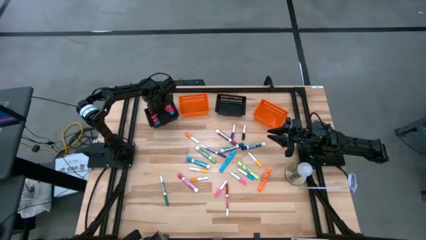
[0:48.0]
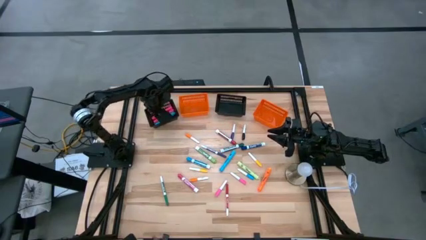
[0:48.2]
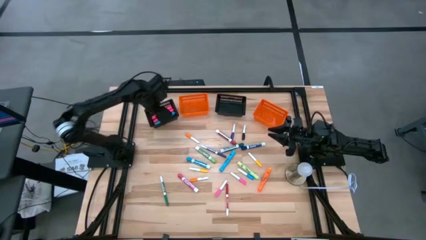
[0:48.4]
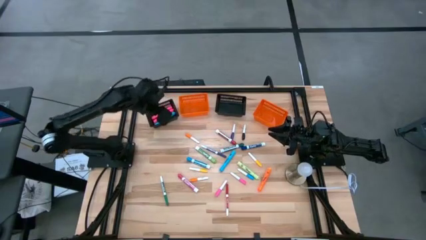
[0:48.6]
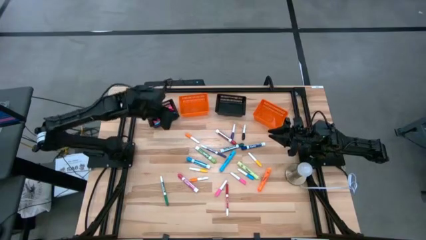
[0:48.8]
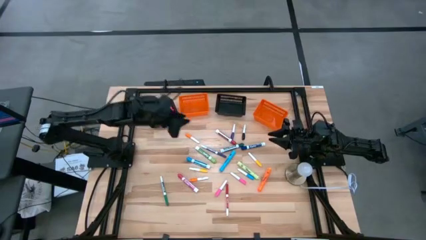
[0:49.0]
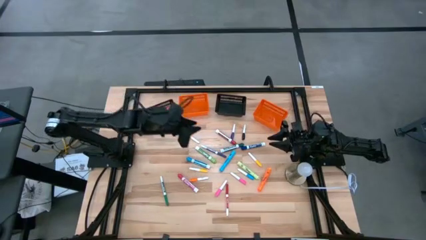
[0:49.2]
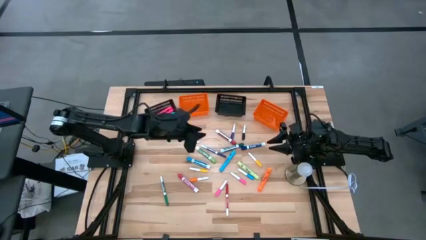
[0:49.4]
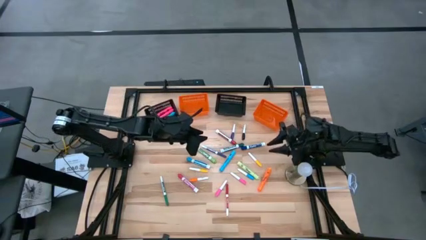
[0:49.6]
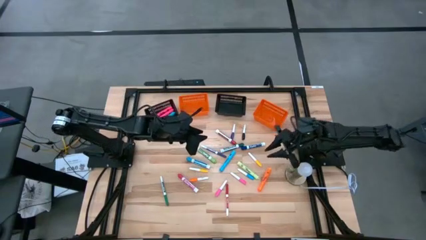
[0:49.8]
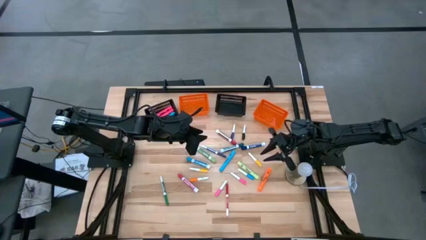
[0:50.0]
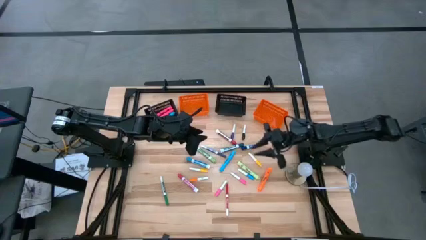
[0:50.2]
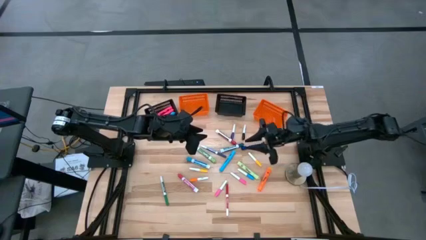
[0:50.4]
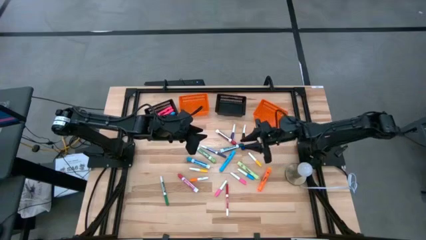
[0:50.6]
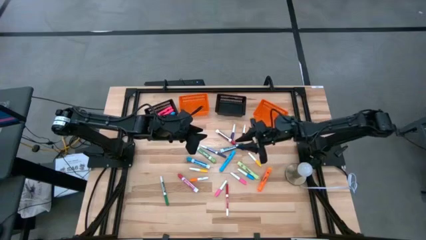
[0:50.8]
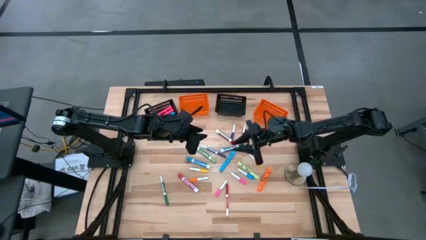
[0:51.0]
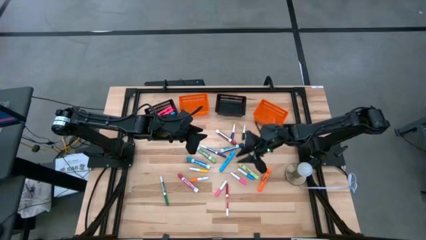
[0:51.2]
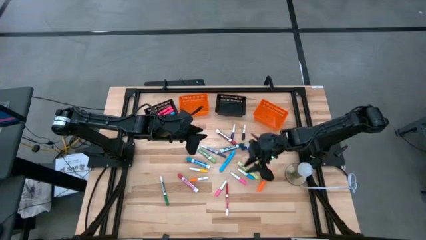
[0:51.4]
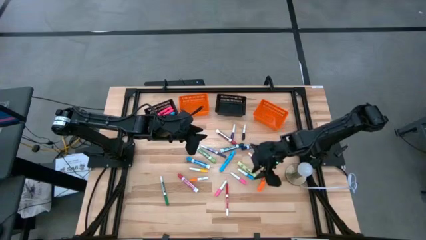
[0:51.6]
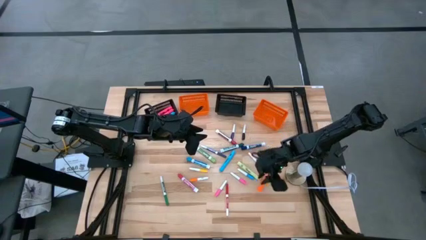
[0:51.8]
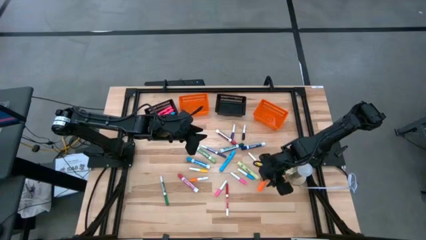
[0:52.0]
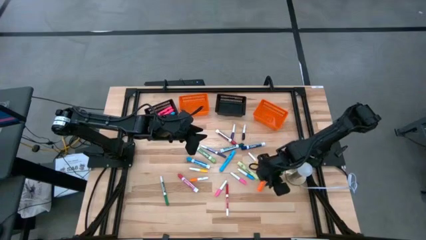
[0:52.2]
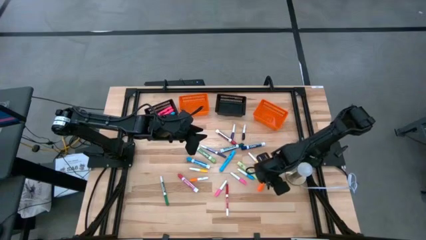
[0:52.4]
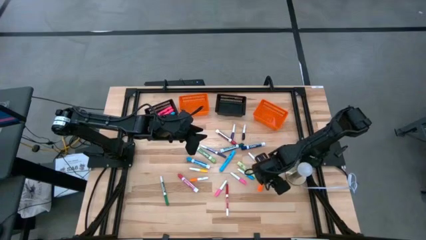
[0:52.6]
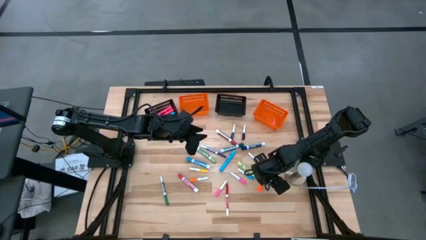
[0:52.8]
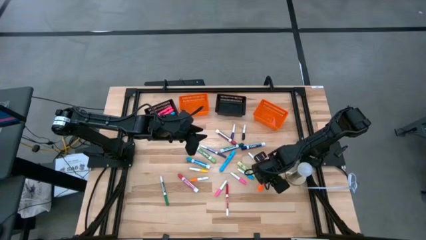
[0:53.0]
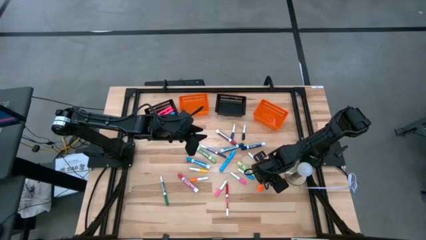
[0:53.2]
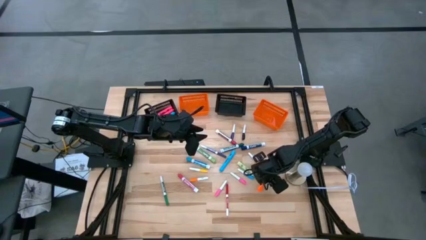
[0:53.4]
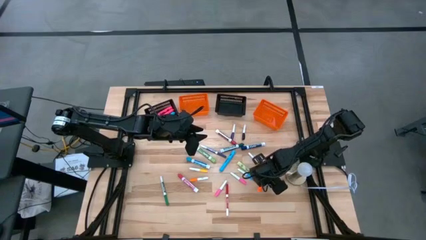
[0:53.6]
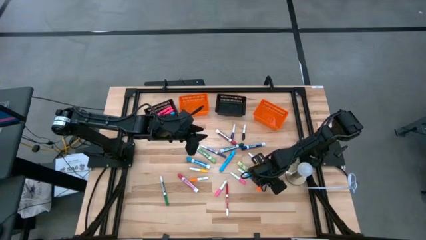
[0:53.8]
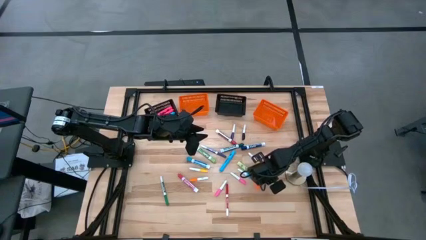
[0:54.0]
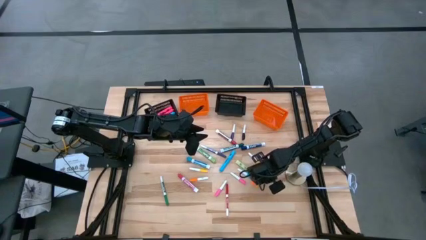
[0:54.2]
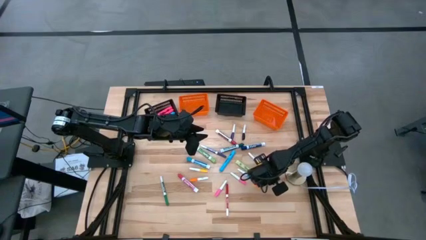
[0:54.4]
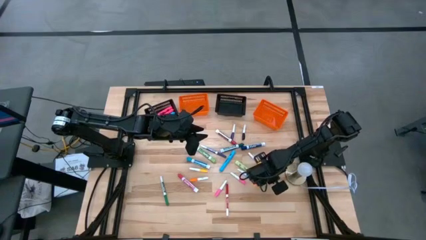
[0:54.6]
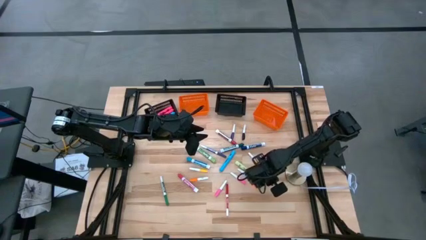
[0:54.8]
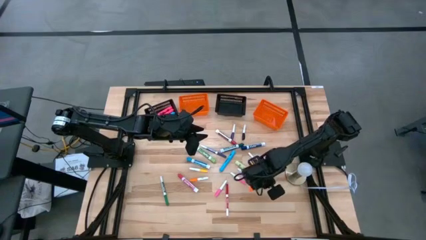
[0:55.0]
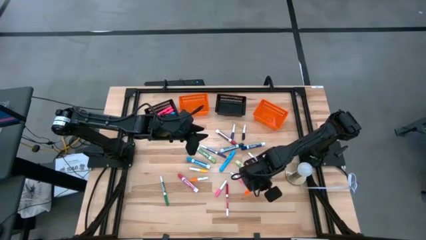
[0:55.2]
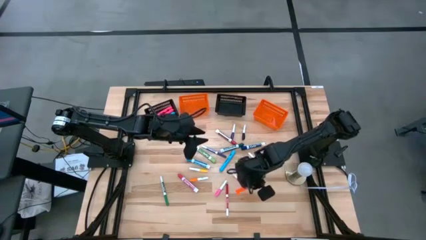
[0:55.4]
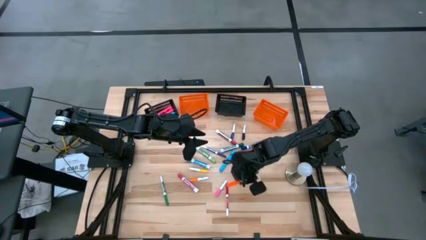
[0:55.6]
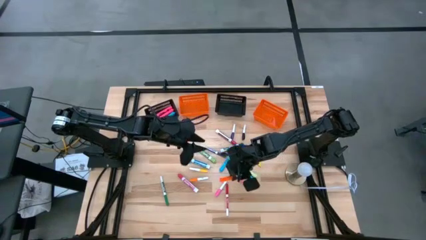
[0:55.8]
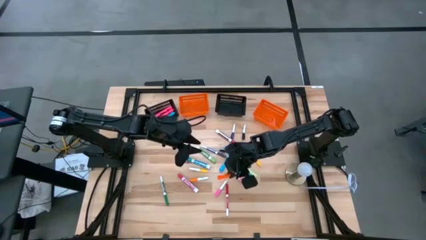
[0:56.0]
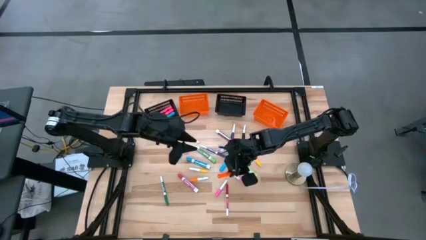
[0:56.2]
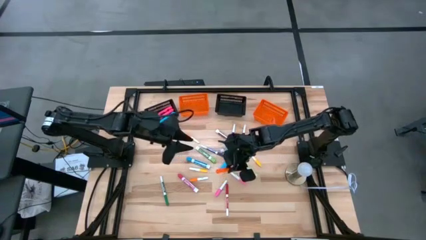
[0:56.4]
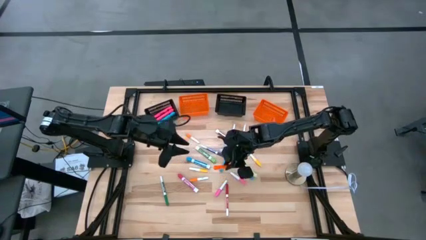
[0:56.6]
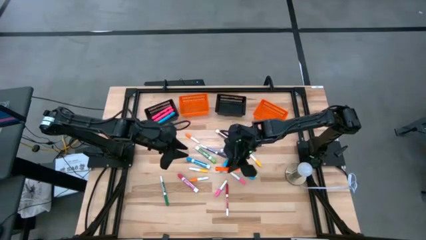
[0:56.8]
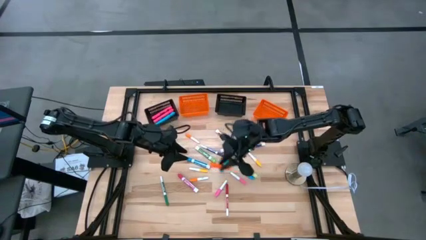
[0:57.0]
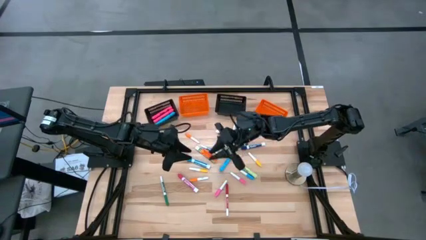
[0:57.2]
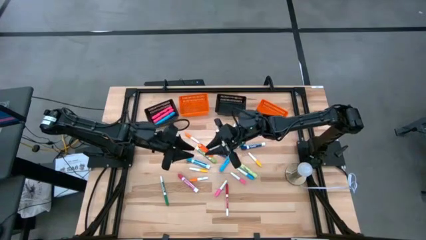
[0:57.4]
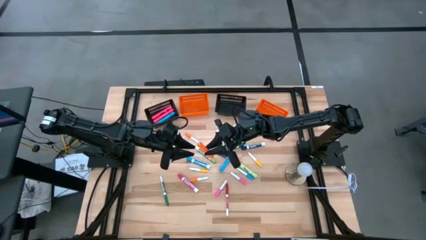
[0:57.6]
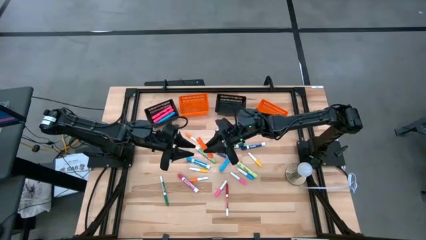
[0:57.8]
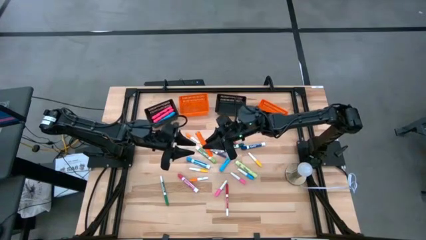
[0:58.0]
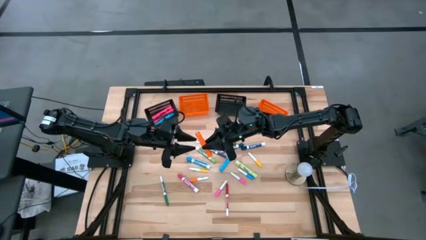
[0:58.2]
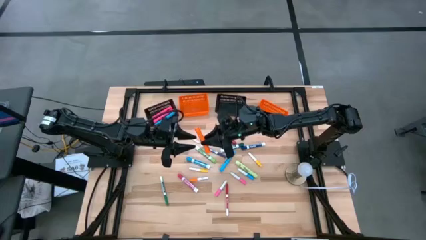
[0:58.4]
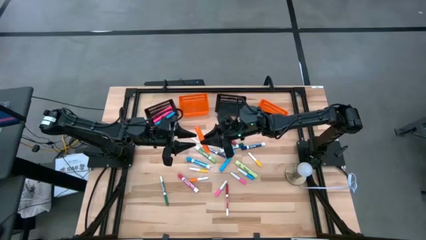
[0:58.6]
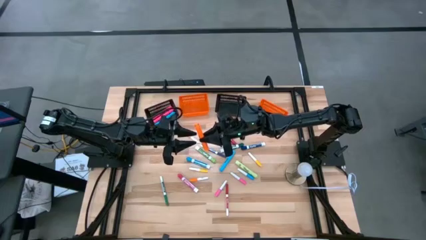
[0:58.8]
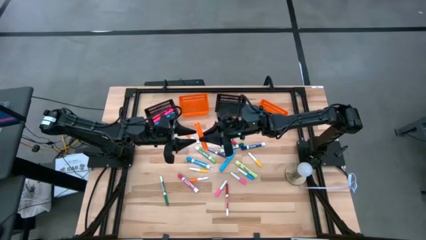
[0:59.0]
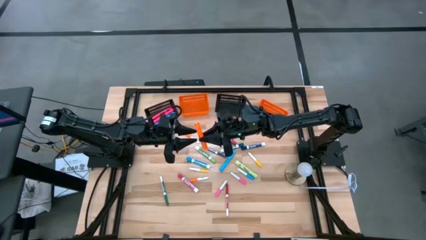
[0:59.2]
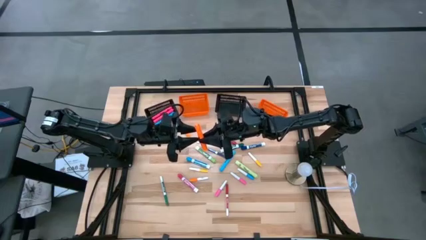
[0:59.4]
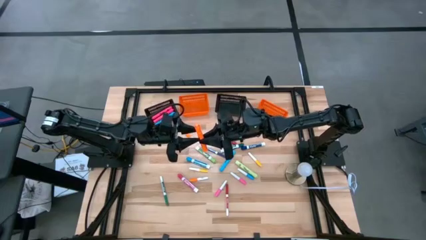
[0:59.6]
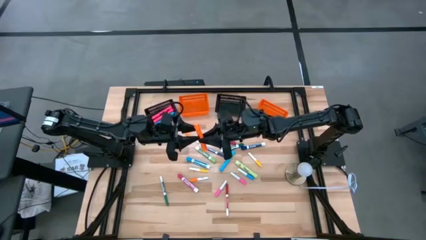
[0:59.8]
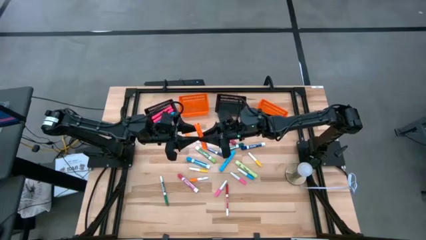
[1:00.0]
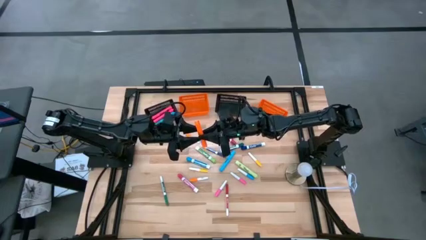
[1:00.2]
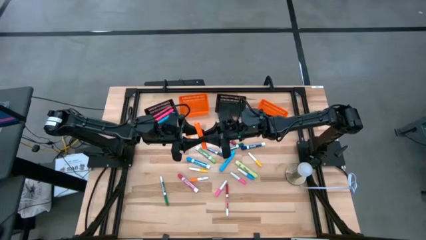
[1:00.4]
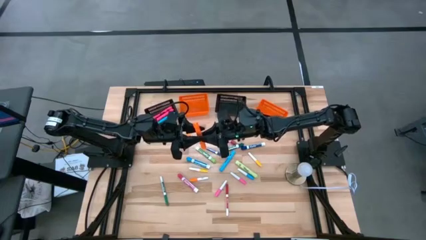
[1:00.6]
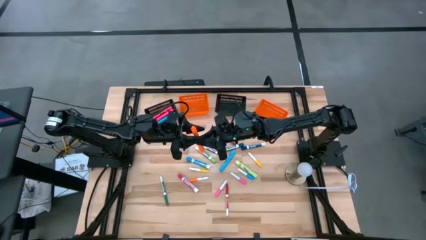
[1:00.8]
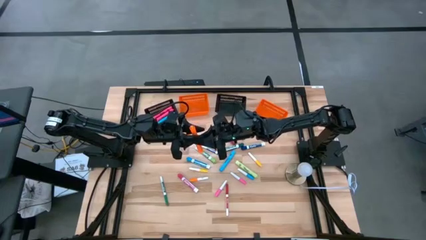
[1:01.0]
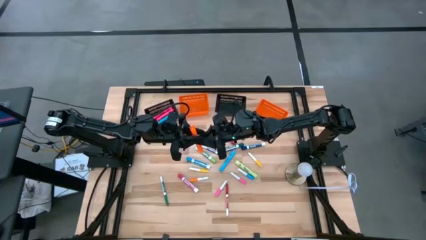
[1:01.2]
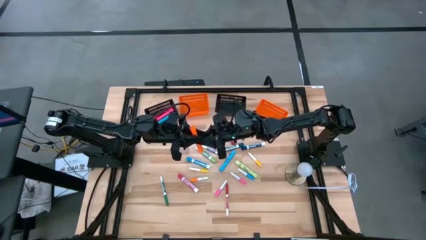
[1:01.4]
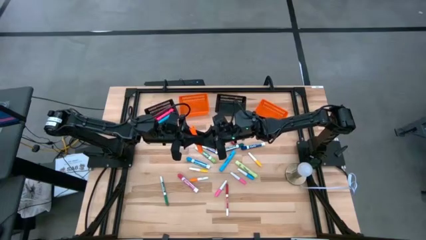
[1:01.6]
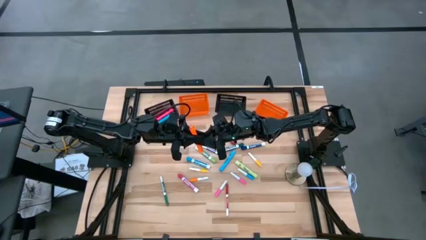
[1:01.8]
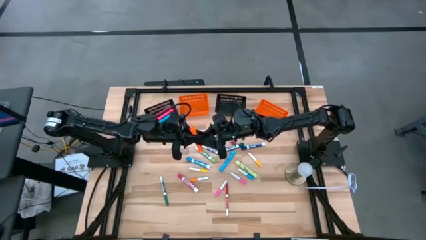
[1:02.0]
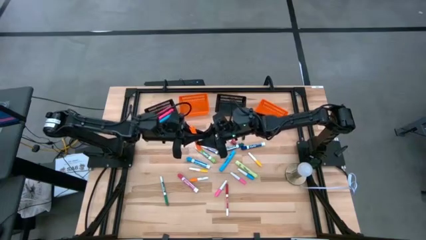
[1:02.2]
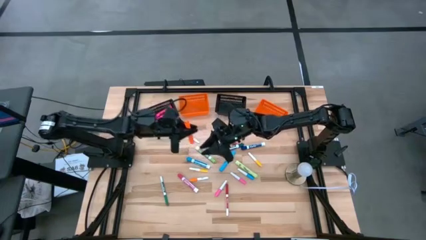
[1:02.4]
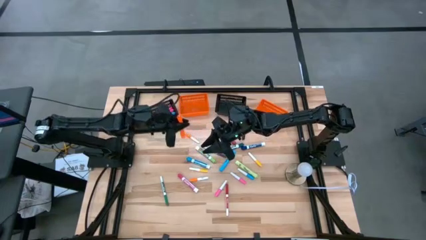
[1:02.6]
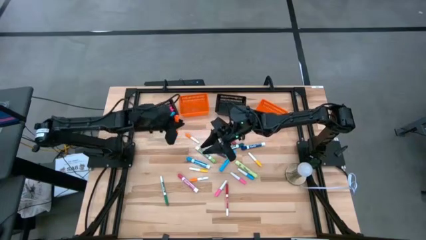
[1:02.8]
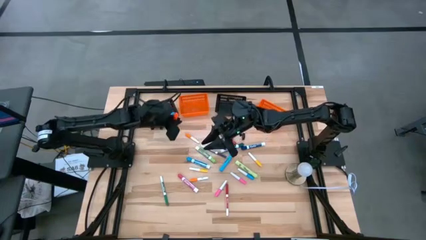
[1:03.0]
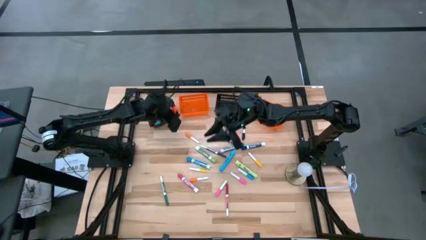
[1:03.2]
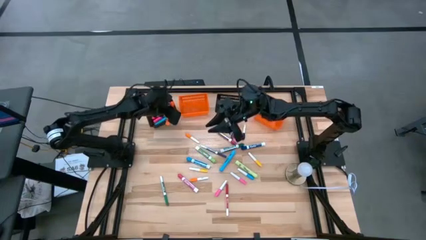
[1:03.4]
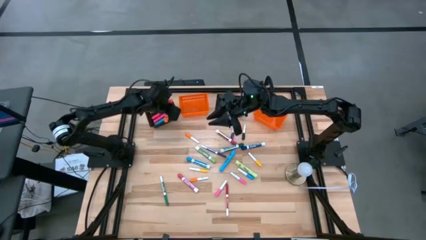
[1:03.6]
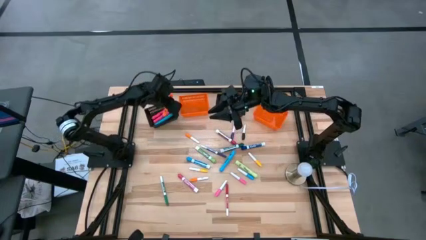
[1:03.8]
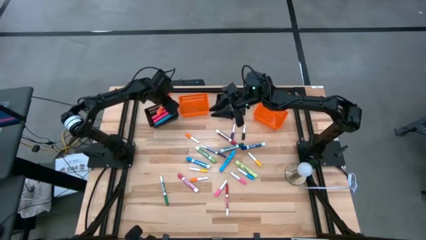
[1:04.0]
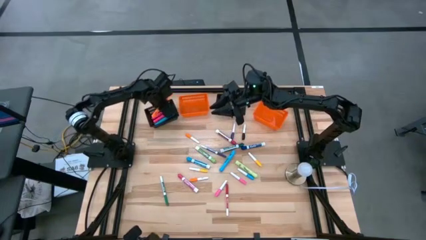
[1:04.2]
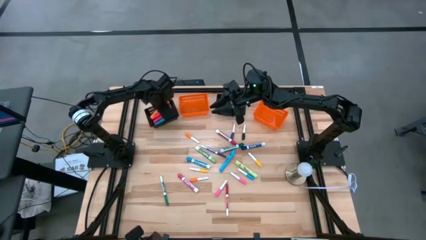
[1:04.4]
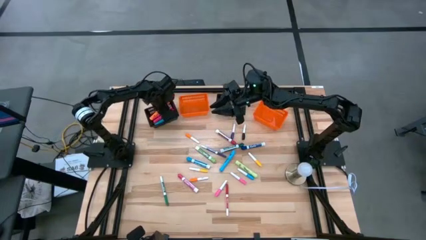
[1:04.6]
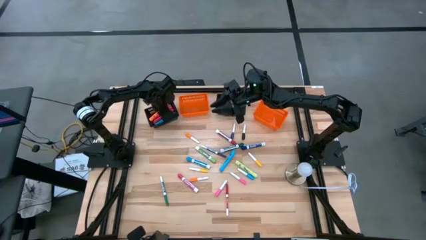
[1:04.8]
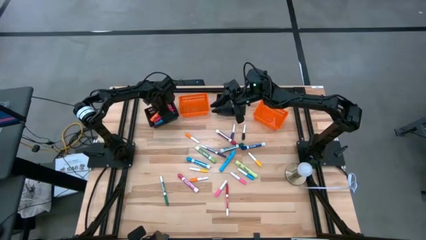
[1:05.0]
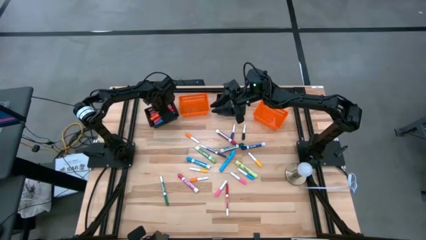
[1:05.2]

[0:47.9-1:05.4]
Task: Pick & Place Markers
Put the orange highlighter pen into the left black bin
